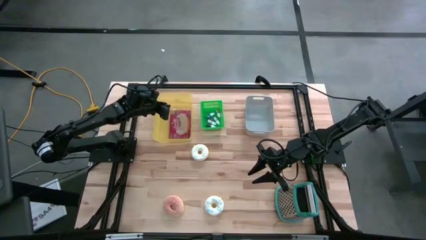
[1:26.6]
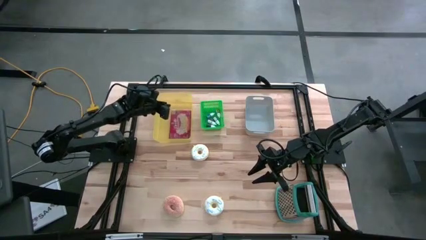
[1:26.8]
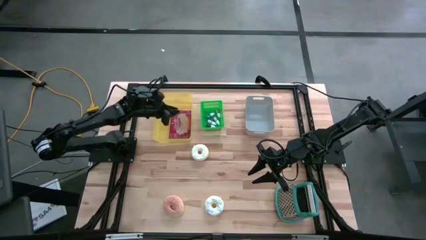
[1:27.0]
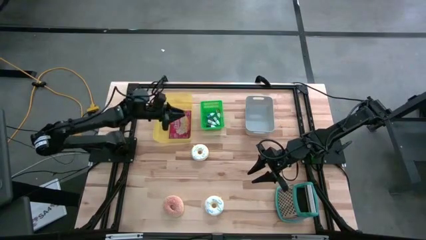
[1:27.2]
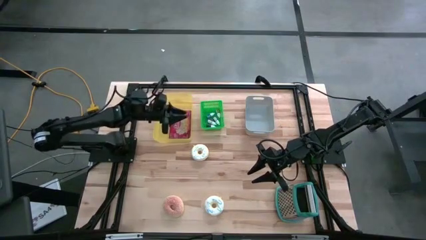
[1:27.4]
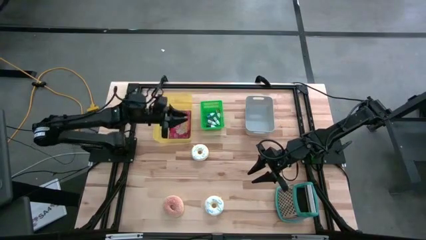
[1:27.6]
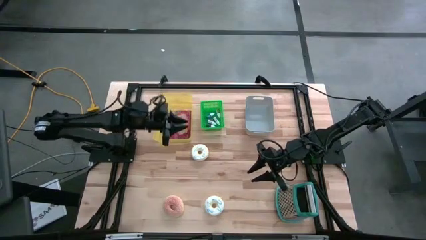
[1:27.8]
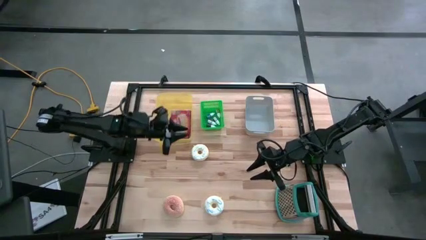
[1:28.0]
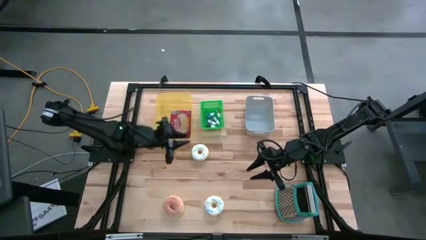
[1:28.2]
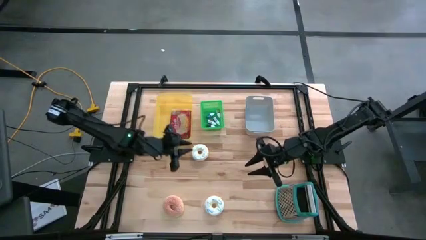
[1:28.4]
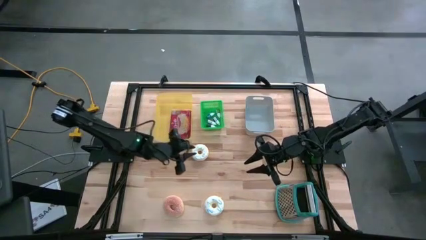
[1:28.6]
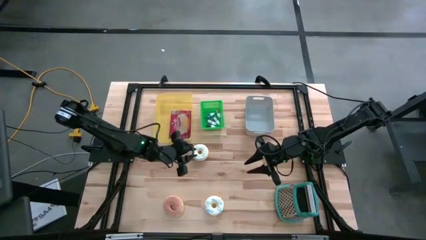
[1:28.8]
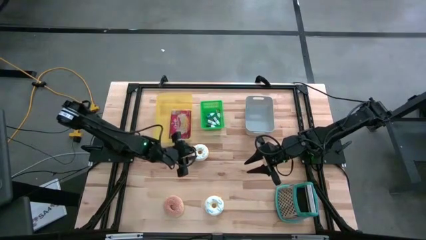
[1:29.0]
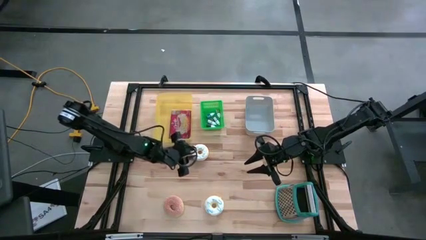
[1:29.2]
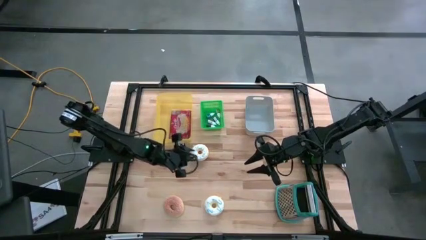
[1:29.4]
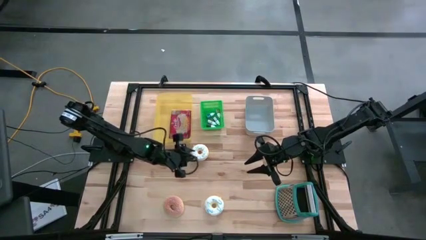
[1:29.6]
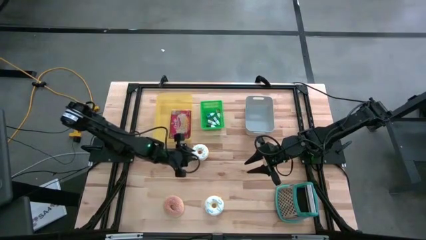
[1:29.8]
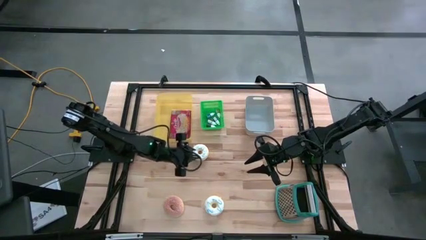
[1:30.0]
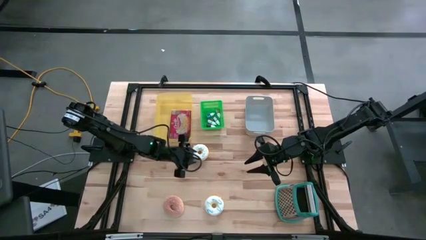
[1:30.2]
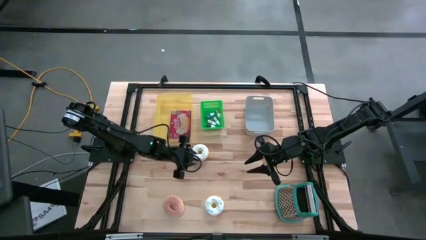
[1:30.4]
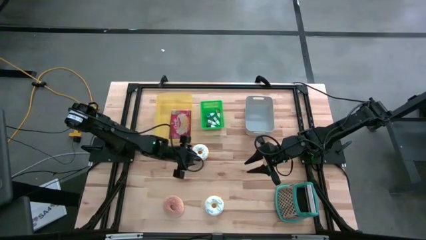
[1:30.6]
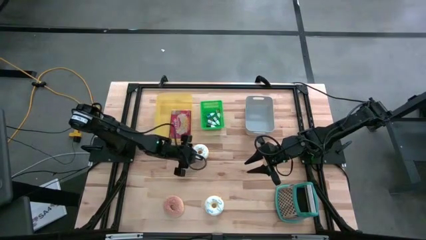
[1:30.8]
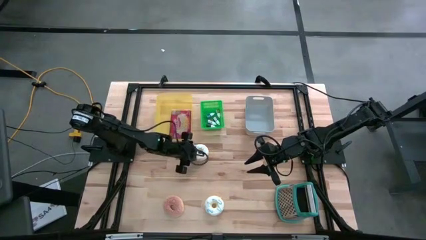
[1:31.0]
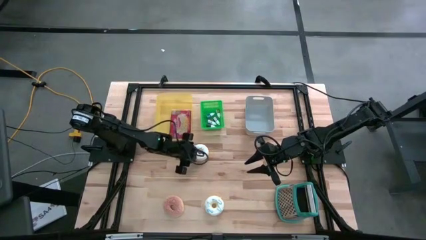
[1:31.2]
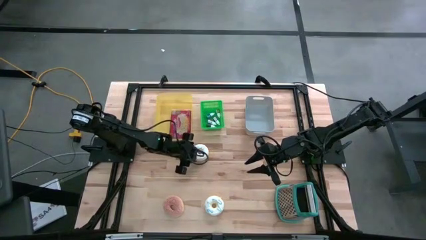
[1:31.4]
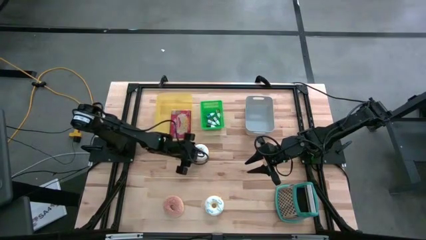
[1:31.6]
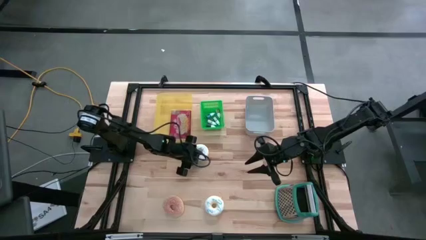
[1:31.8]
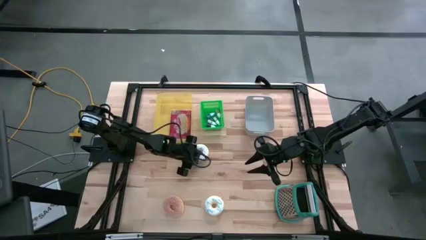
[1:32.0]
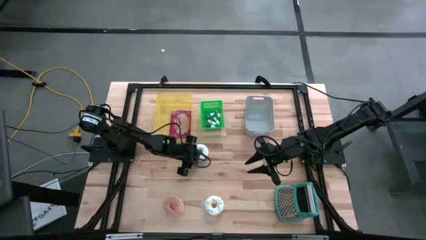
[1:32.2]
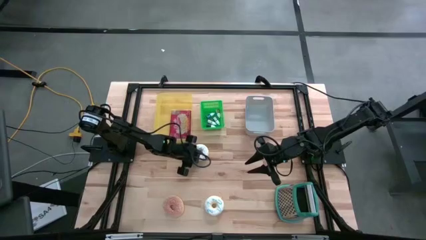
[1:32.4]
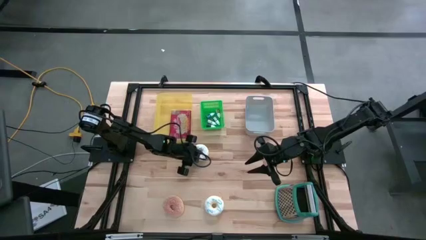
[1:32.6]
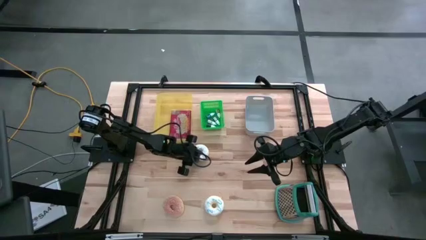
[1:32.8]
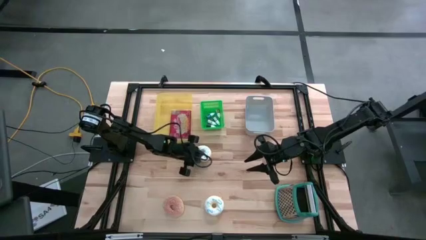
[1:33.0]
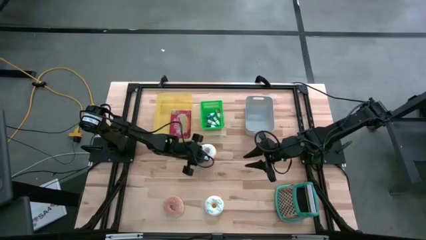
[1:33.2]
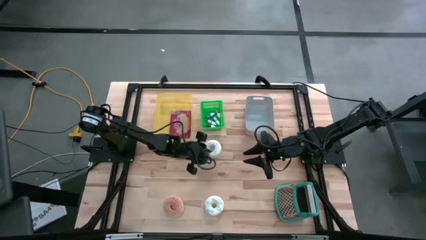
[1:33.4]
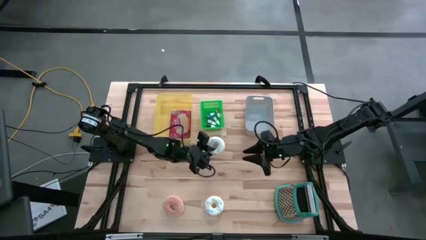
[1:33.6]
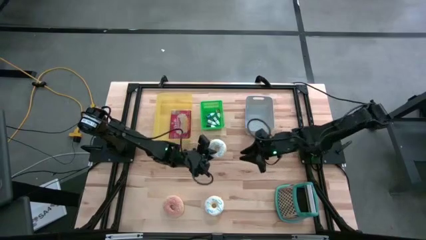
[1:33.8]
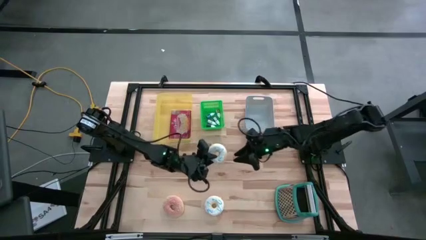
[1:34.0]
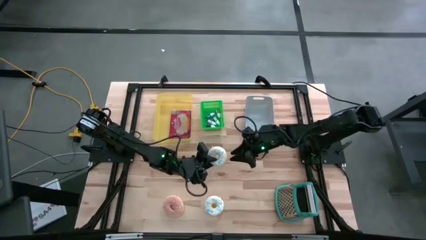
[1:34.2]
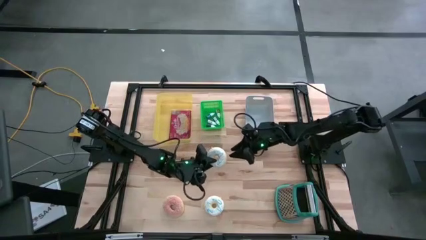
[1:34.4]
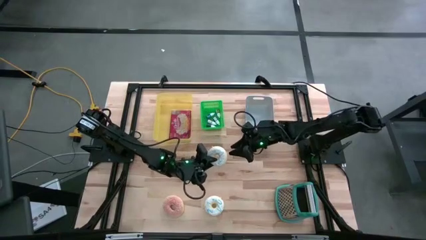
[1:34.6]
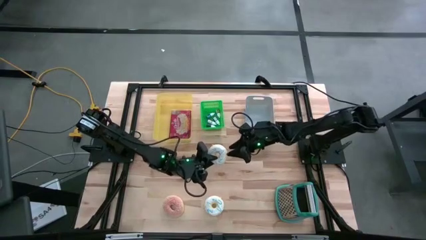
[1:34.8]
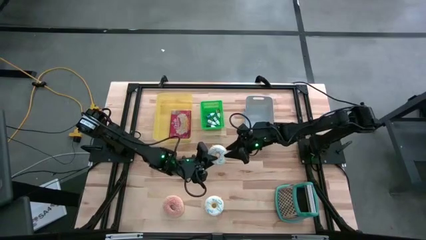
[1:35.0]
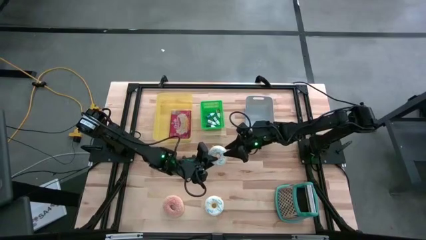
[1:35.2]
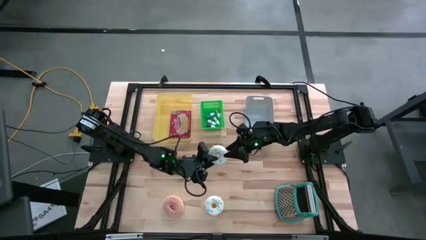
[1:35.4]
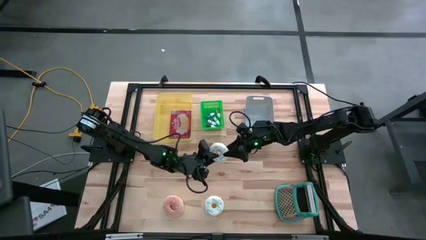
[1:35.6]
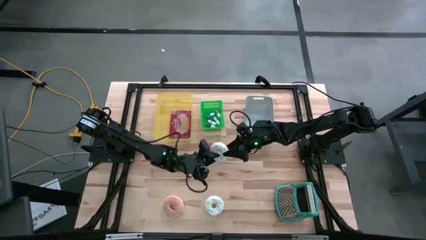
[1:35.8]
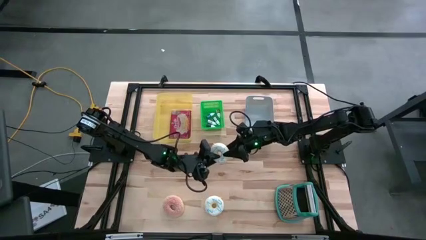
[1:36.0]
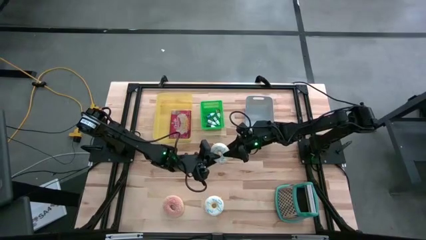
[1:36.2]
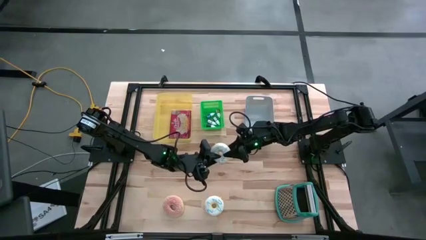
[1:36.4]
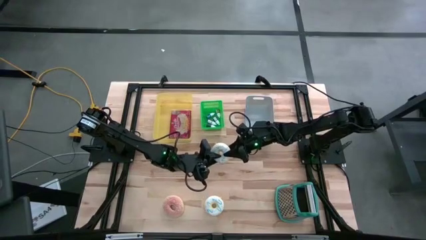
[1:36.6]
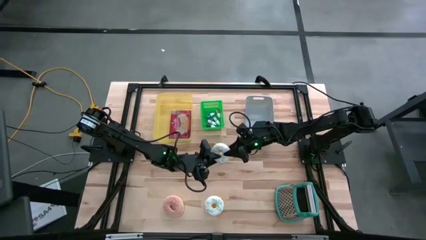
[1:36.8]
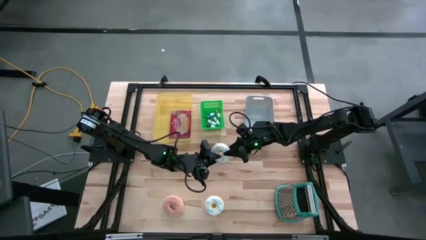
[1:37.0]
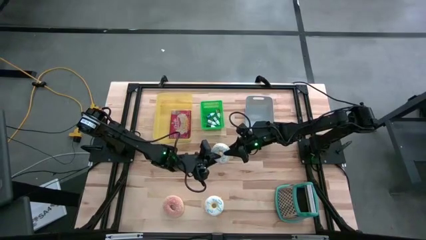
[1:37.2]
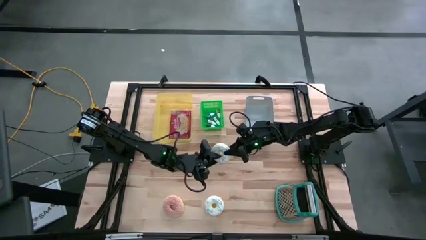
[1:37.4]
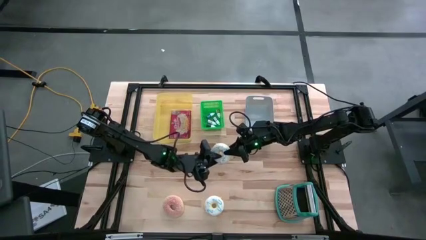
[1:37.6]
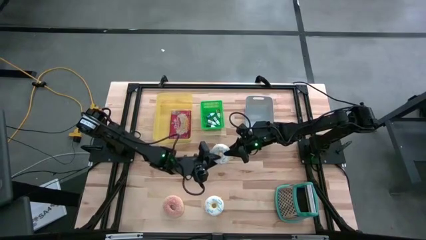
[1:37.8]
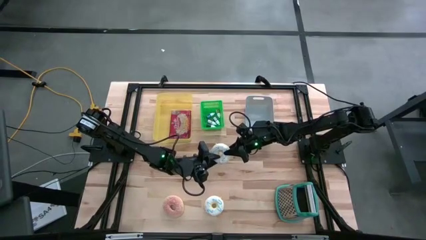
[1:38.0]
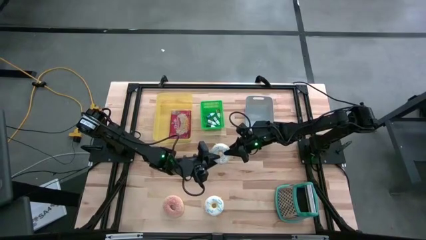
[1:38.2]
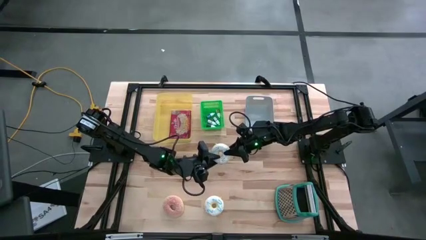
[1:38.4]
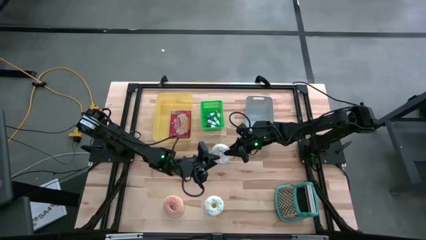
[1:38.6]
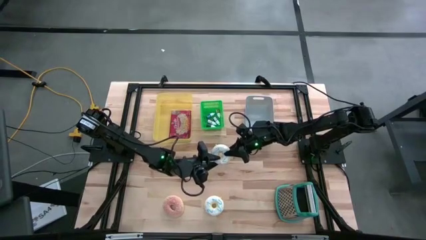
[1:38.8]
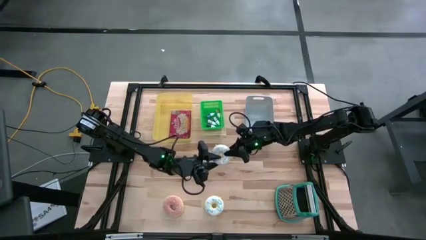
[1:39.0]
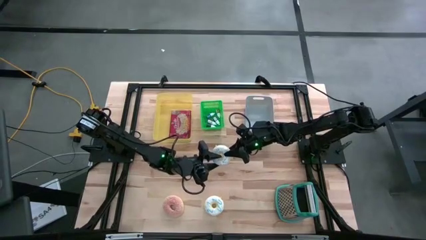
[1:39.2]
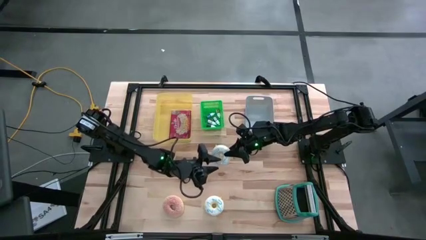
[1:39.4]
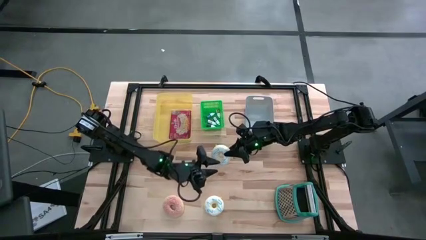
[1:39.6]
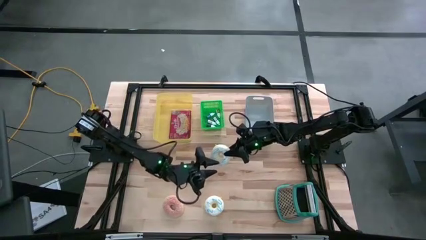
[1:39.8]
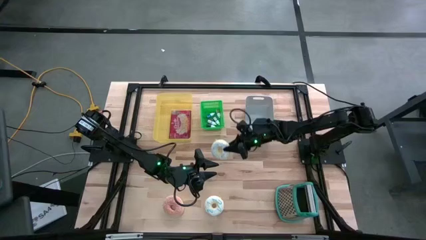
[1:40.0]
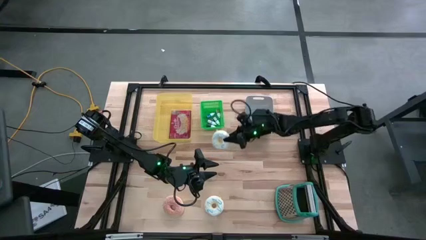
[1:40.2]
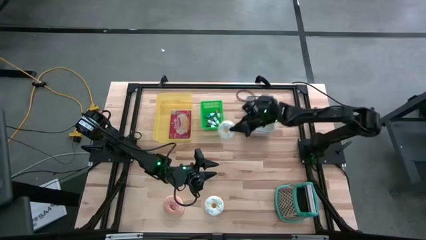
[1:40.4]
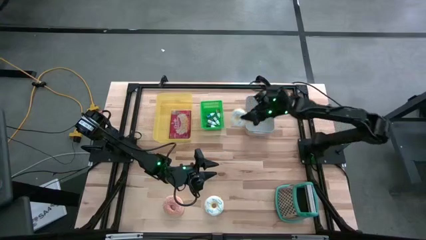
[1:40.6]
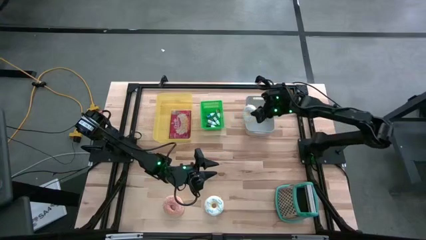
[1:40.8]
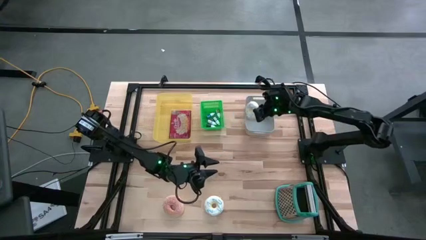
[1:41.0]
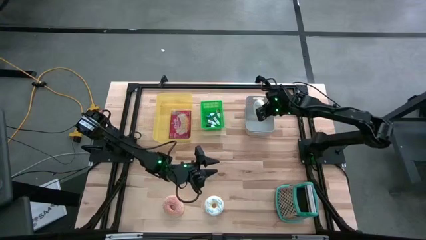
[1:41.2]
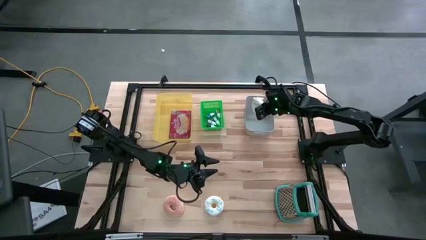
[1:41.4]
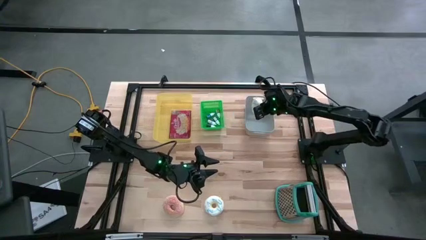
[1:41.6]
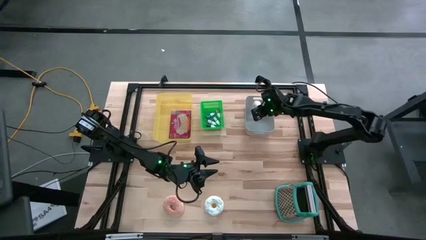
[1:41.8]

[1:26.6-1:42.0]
Put the top white donut into the gray bin
